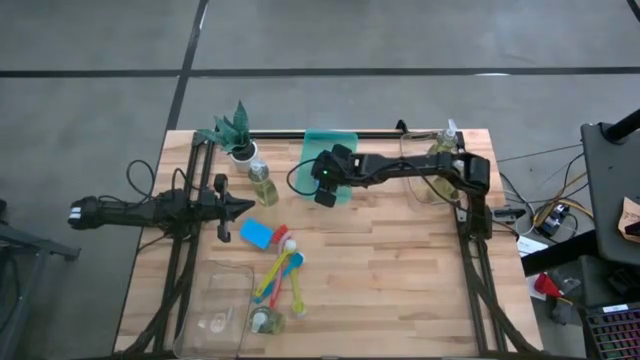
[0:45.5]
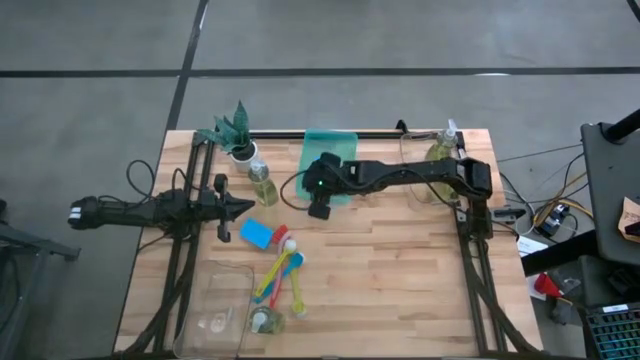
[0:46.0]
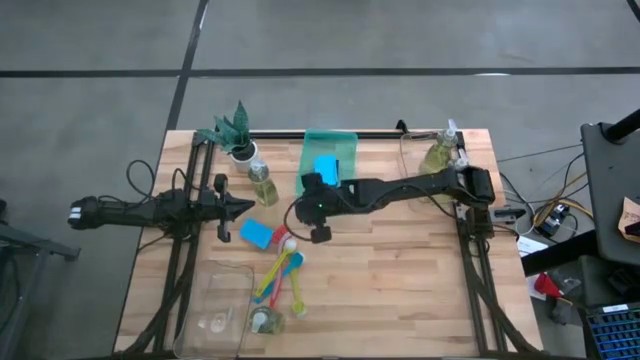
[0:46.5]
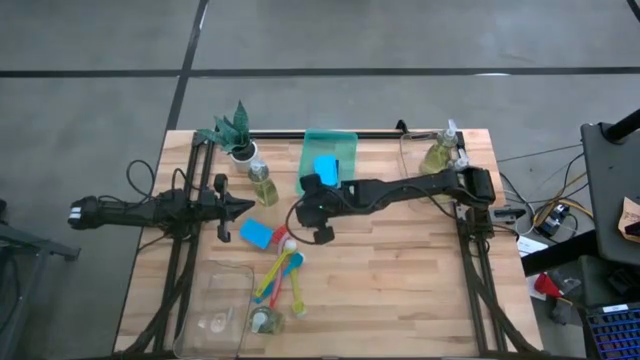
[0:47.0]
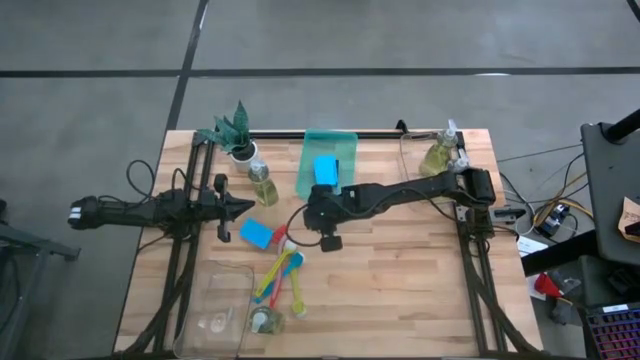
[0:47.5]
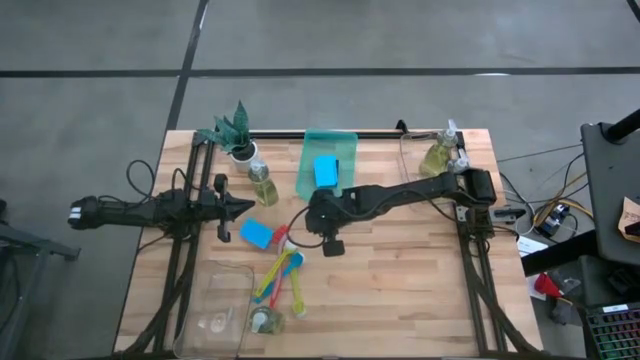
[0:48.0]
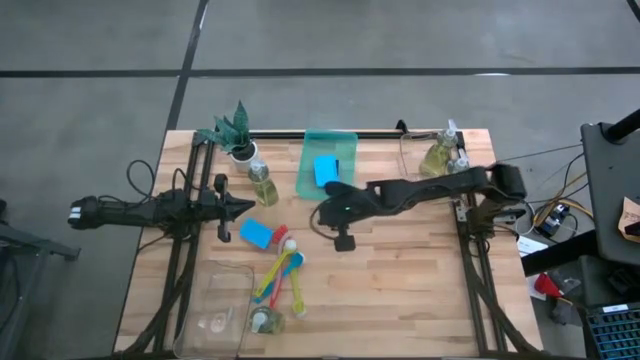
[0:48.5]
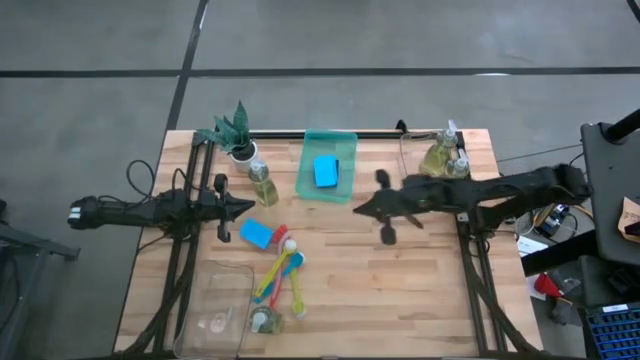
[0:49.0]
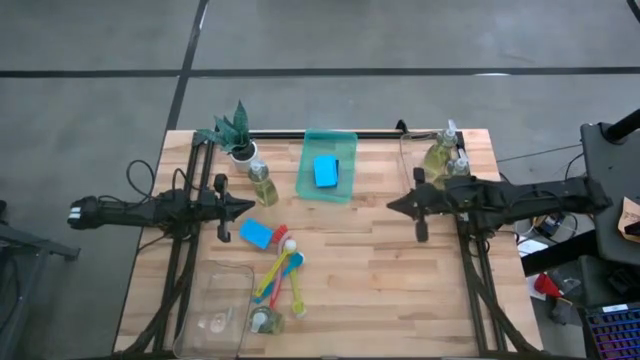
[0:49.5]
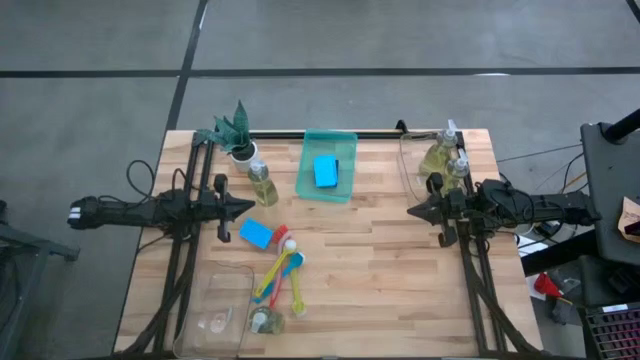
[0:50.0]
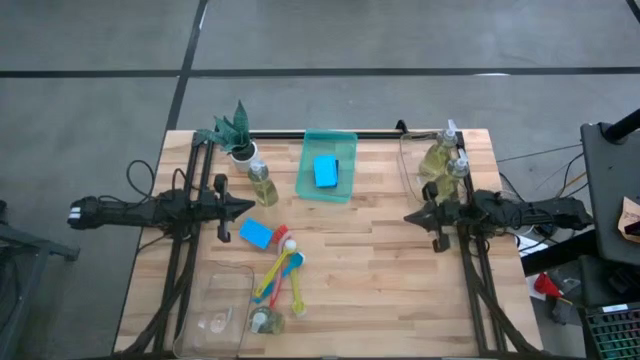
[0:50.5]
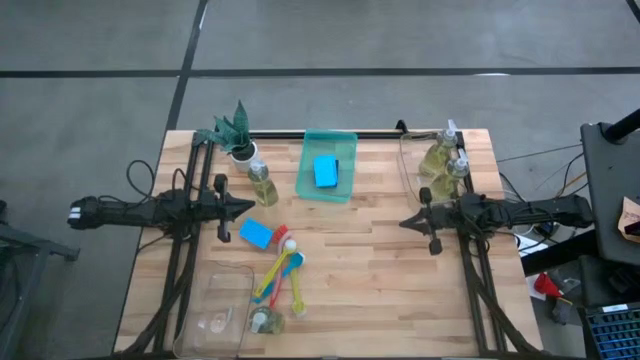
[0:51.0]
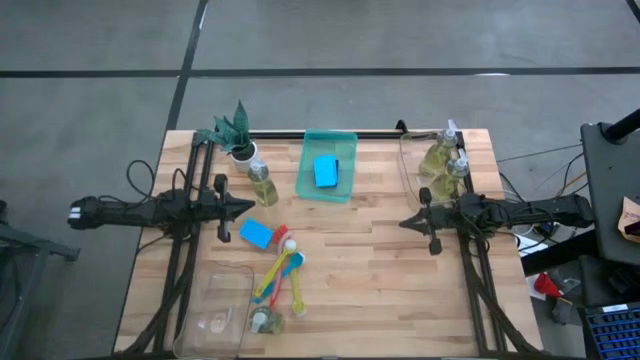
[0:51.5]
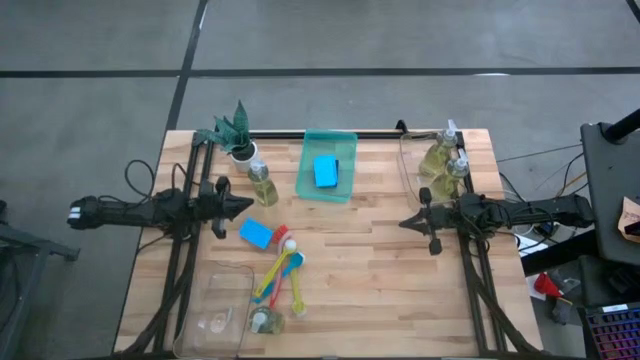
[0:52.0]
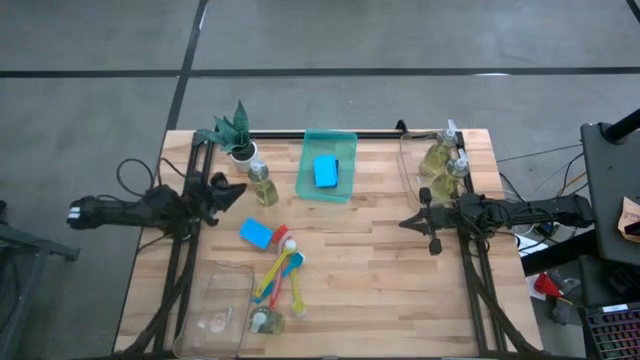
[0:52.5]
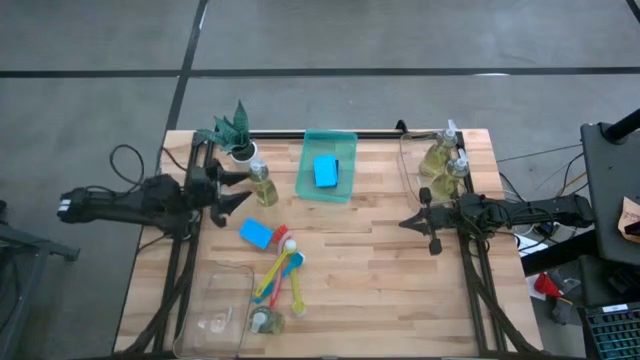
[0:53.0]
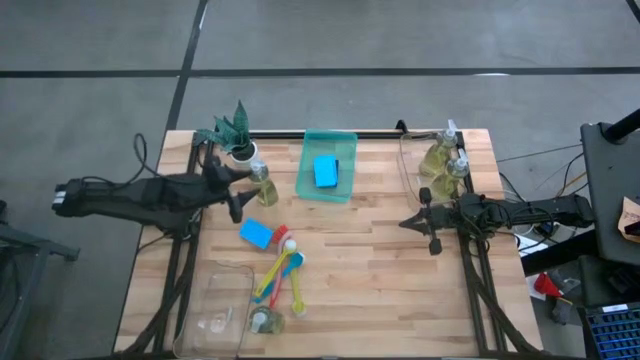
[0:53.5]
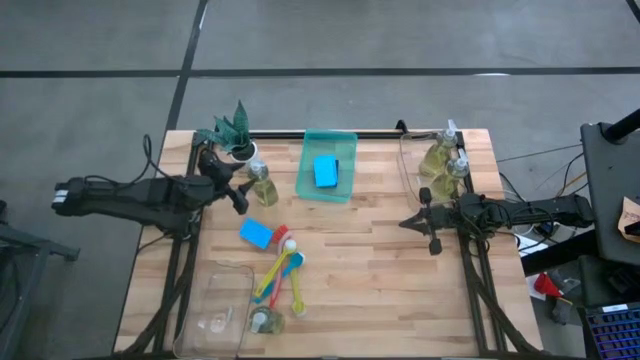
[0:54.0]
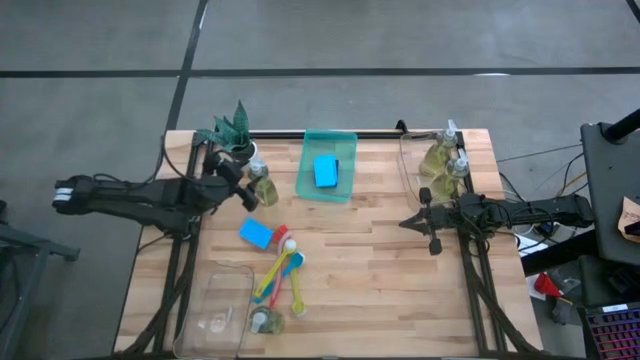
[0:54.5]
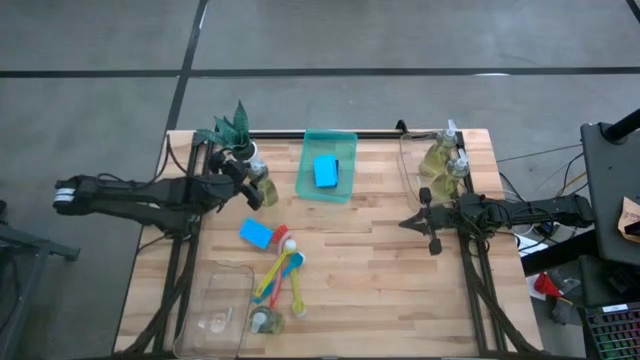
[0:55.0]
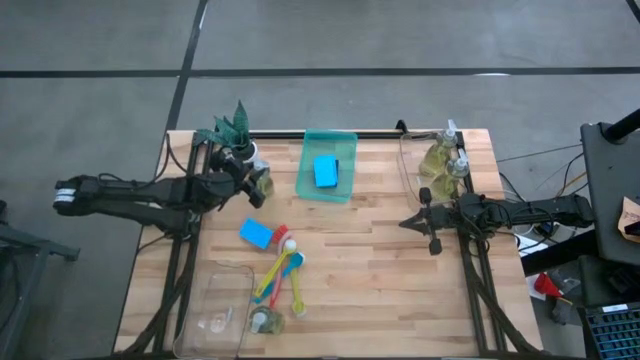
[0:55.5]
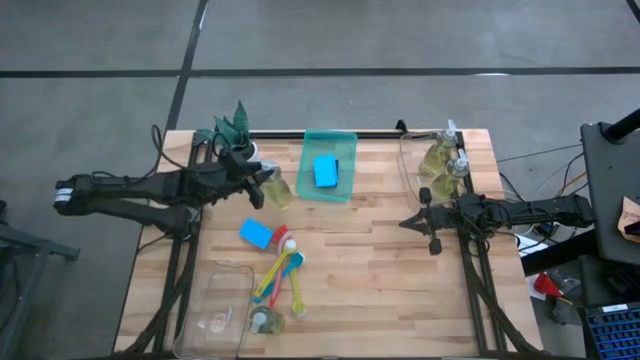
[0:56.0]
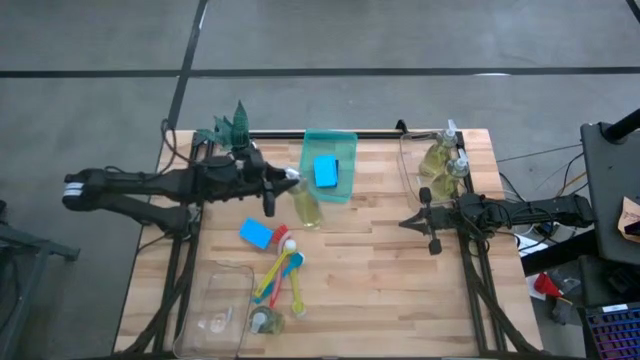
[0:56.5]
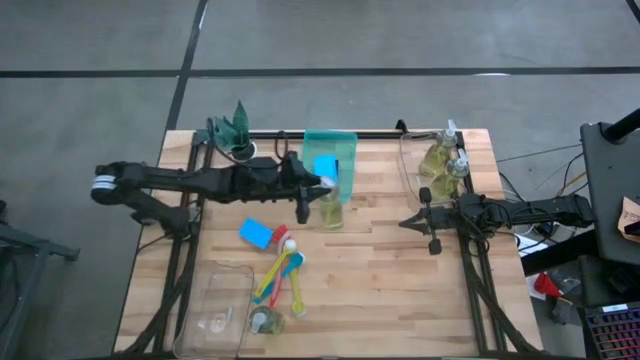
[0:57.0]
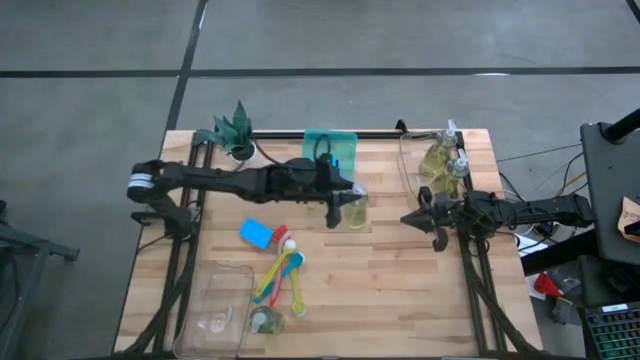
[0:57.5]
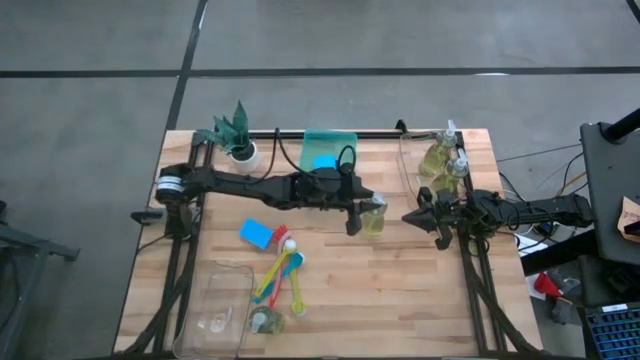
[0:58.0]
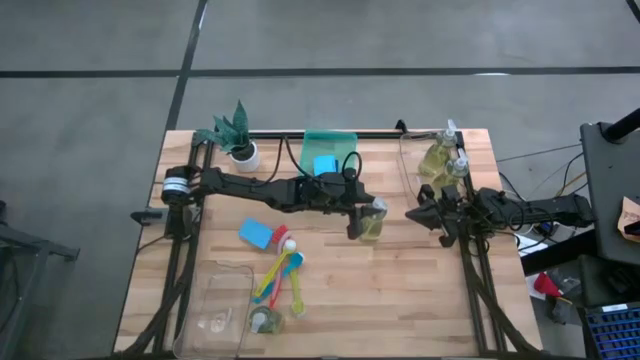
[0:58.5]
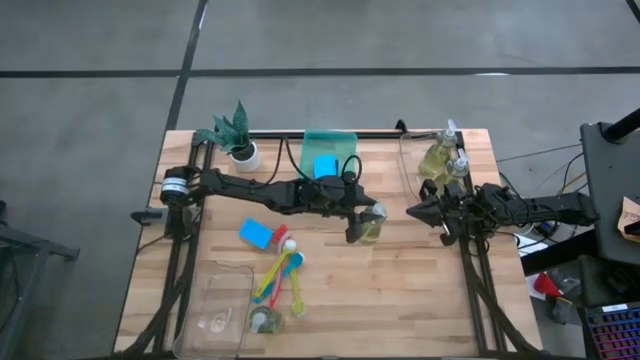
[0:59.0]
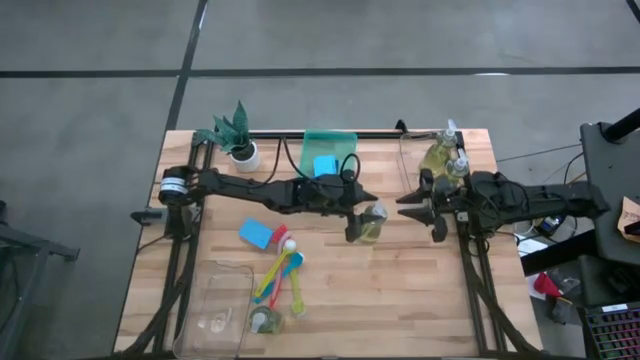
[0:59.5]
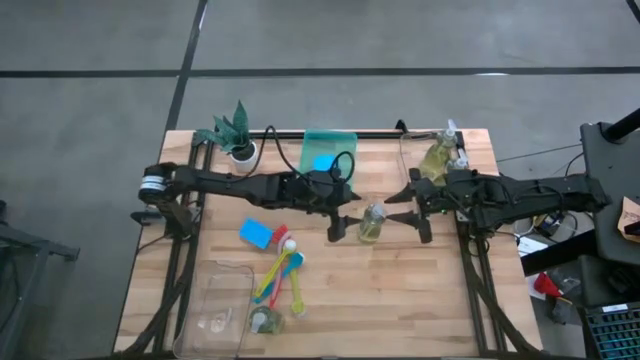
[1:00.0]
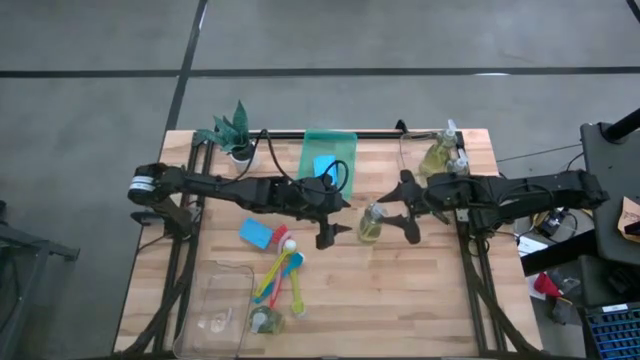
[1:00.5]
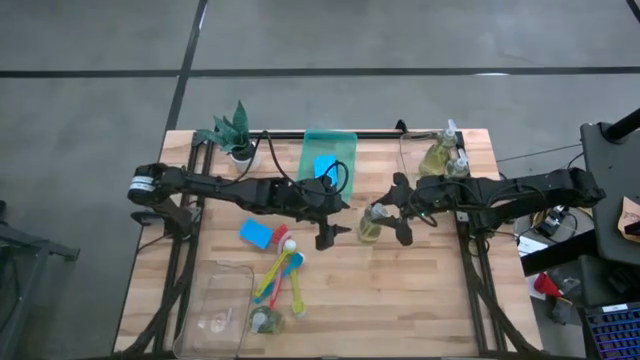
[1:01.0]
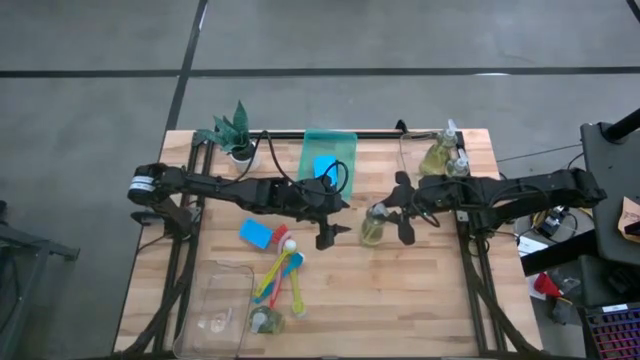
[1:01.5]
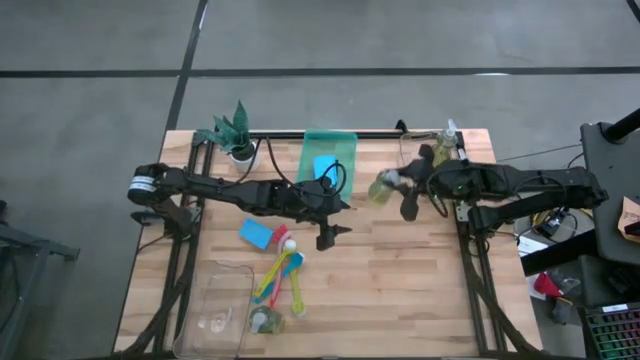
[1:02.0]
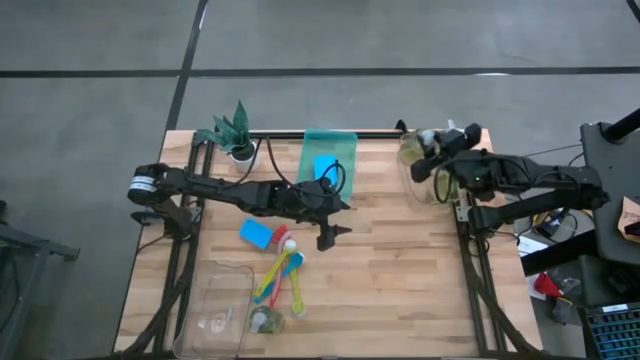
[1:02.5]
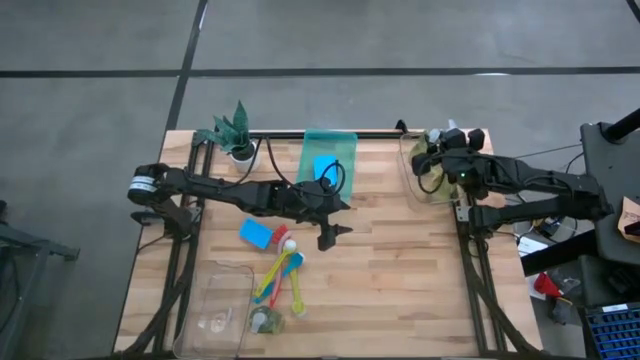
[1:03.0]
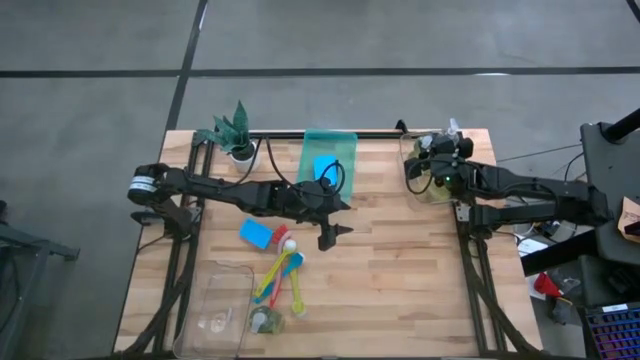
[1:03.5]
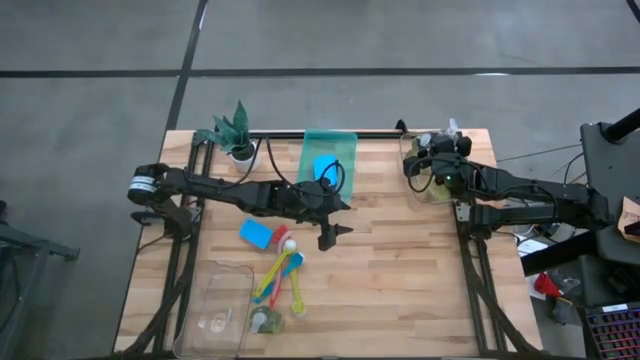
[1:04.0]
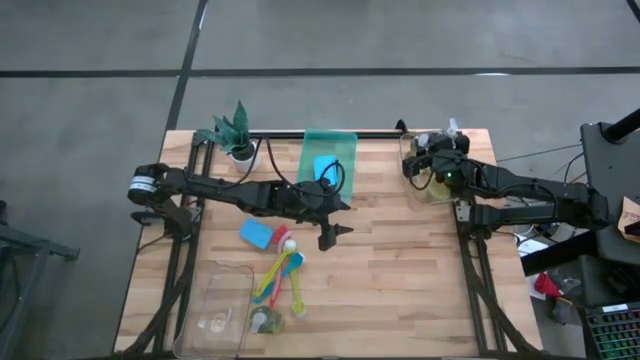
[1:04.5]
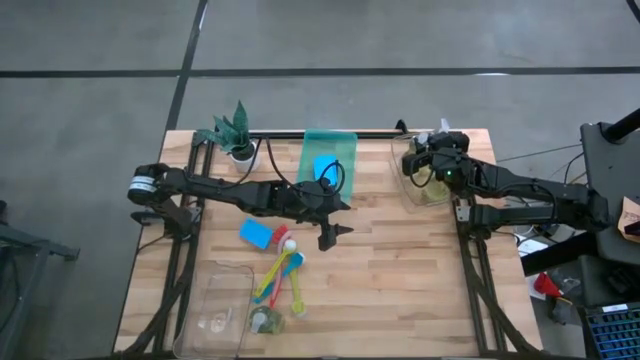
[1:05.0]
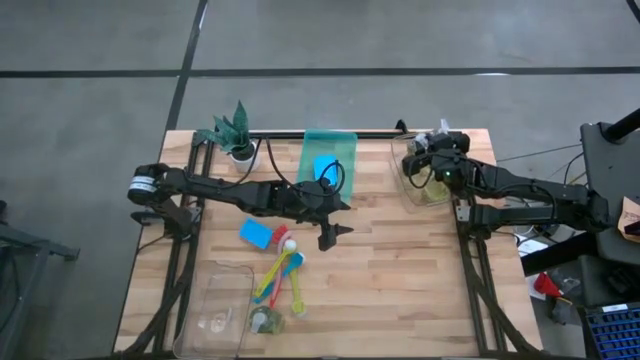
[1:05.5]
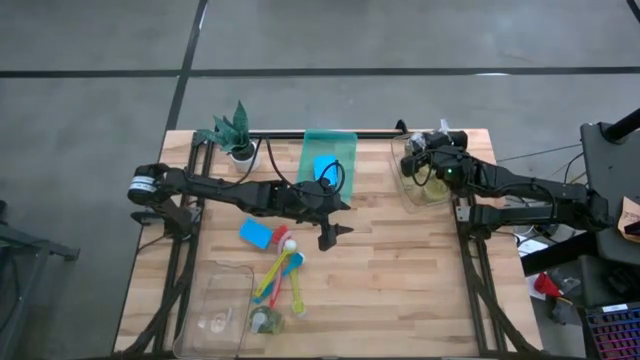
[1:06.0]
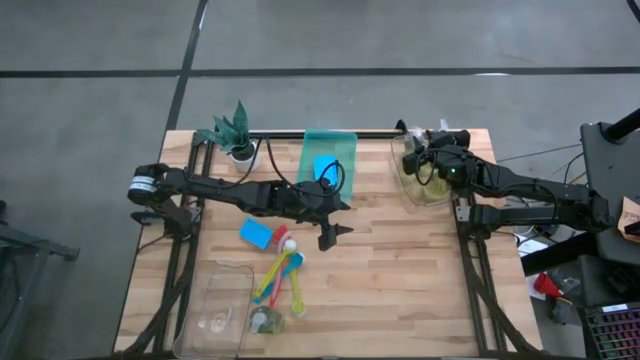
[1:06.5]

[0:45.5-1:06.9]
Task: Pick & Place Kitchen Sink Supplies
Put the yellow soap dispenser into the top transparent bin
